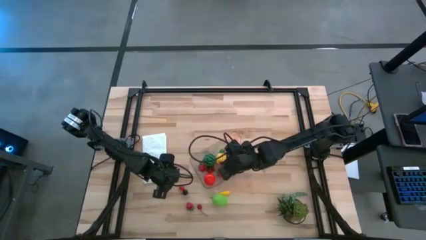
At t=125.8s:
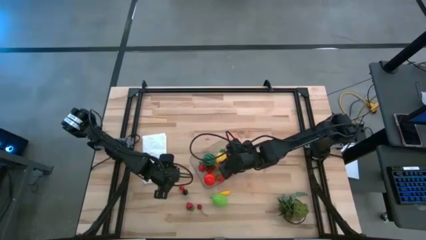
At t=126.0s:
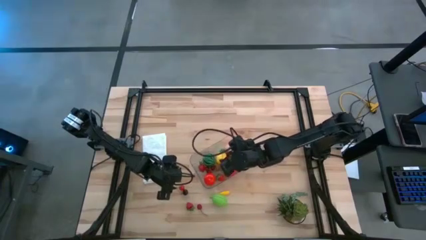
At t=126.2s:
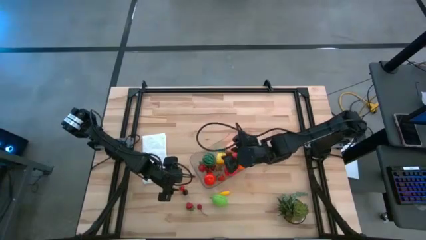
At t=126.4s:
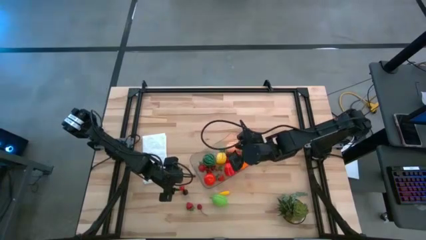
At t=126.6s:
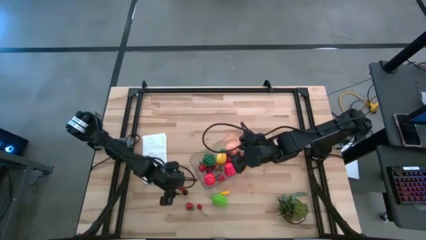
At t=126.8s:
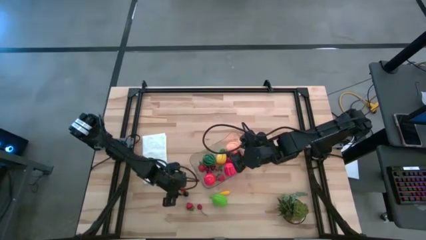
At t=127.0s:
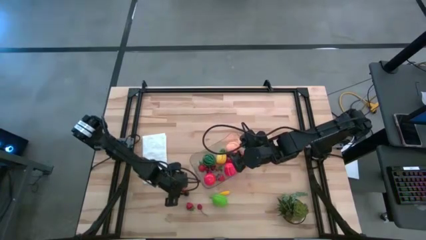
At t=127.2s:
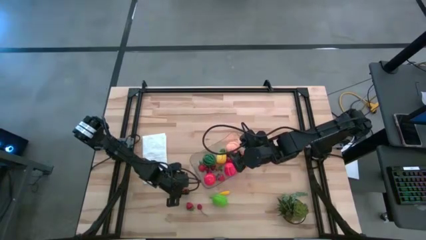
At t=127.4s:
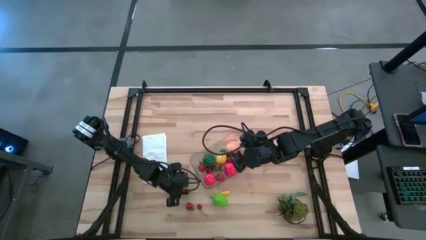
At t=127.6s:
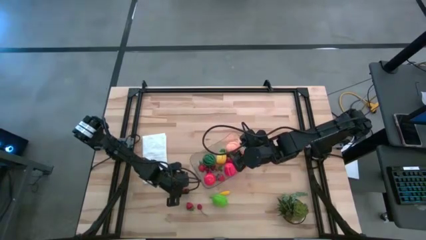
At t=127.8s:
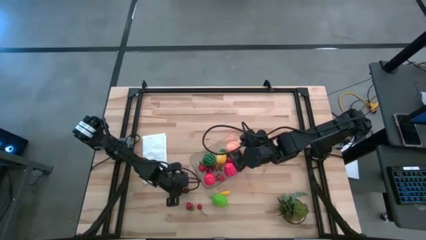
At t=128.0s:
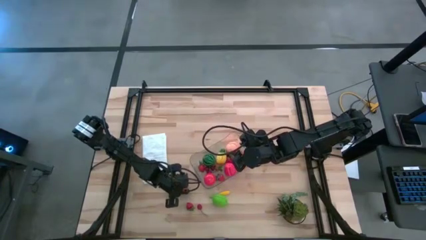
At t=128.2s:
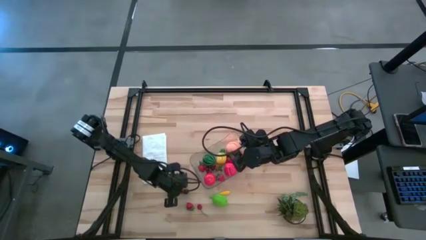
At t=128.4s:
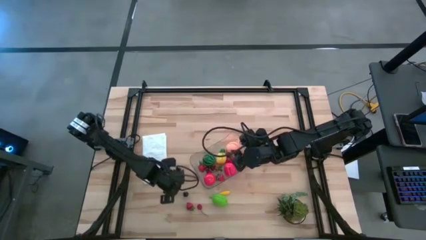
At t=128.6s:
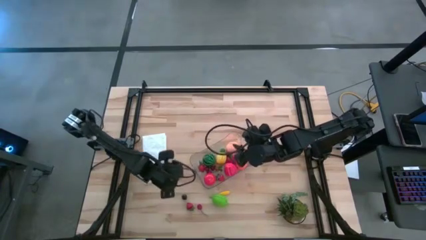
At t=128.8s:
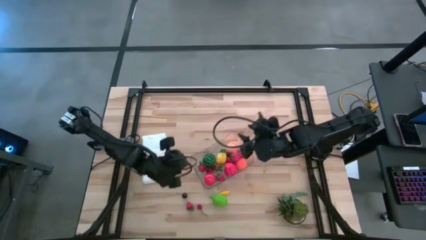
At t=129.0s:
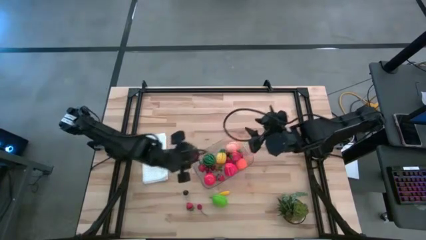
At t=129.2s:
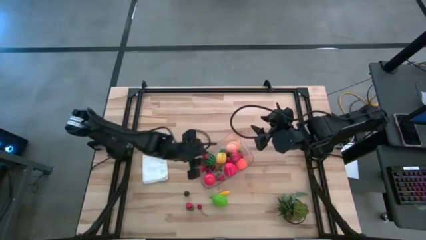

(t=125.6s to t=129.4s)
Task: Pick and placing Produce into tupperware
Put the red cherry into the transparent bin

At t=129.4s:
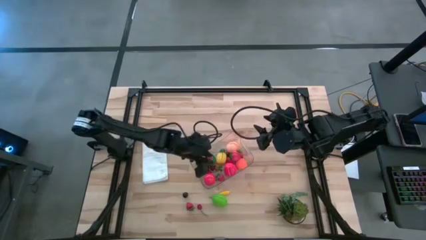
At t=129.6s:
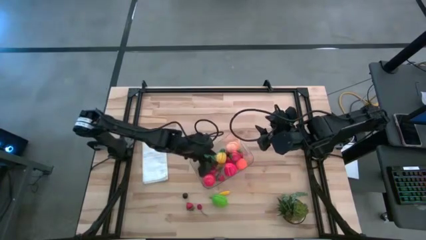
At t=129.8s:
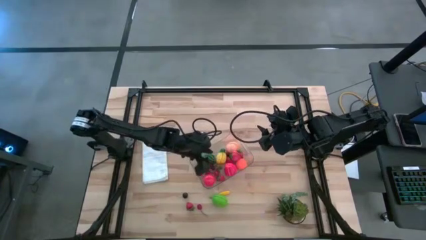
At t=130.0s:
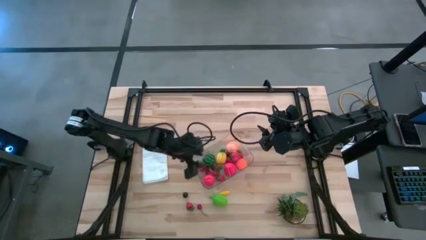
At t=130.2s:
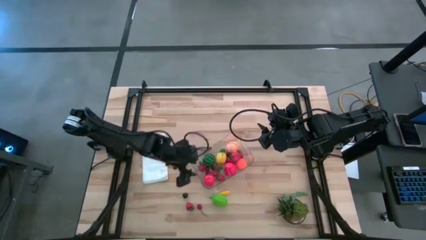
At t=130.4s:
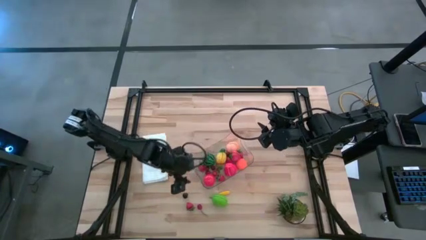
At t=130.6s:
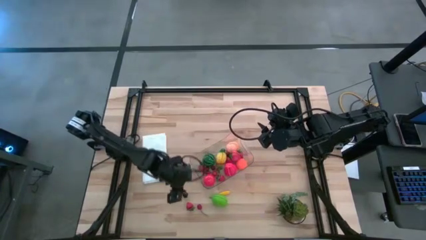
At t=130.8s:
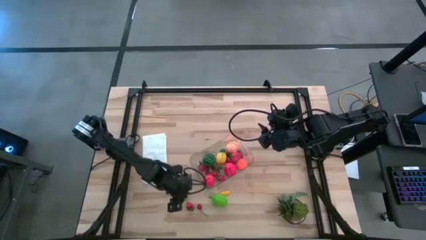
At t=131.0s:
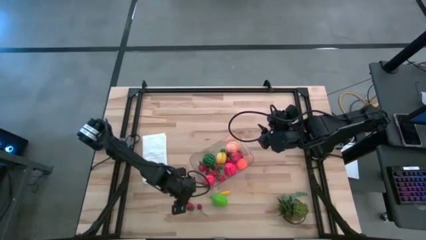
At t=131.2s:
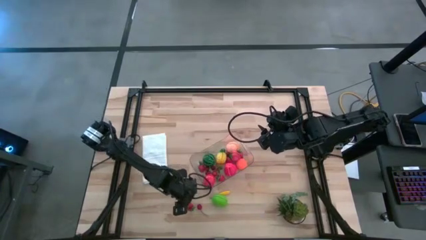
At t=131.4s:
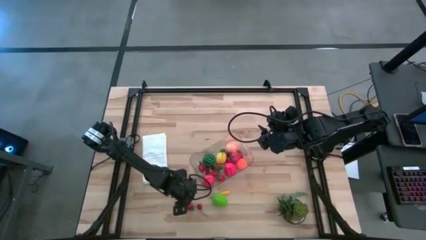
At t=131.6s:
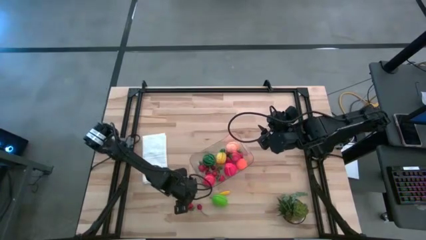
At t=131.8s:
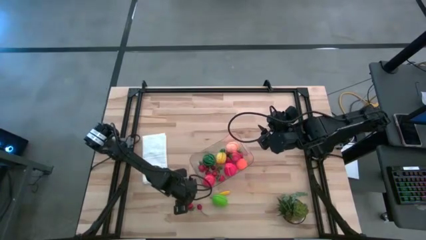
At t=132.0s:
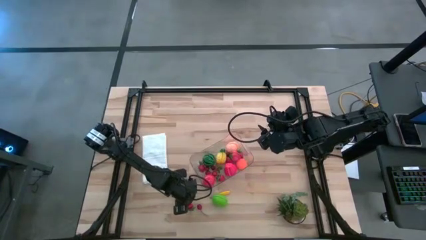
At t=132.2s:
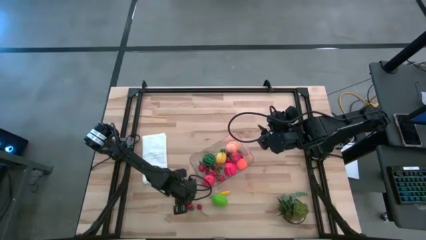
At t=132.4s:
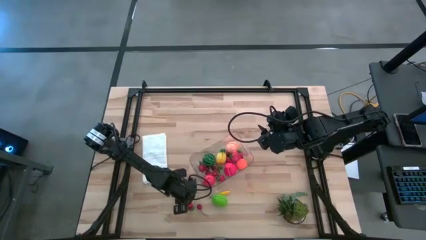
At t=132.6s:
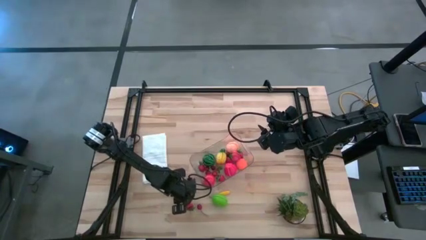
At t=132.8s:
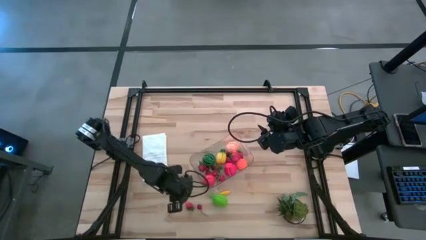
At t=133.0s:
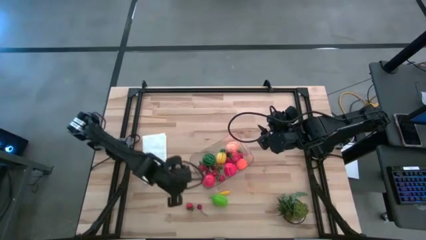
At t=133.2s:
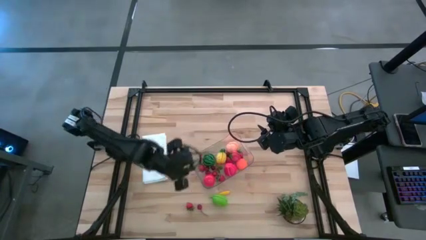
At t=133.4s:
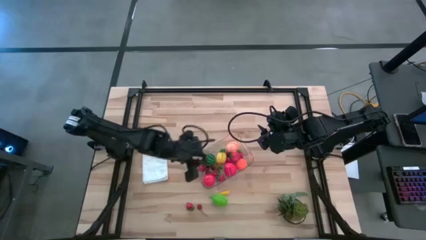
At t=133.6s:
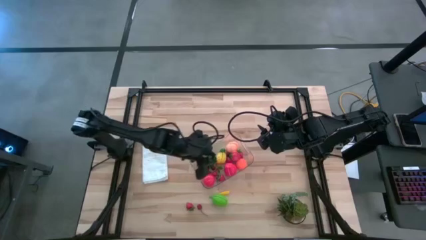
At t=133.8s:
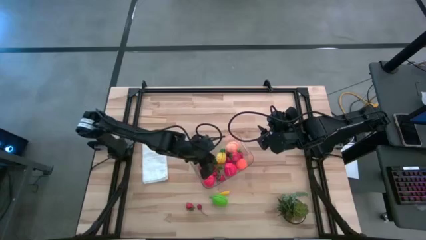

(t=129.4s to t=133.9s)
Put the black cherry into the transparent bin

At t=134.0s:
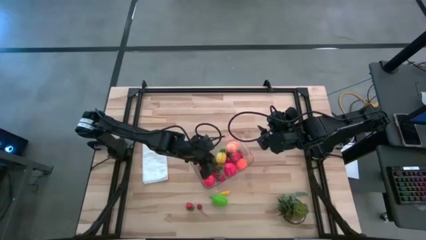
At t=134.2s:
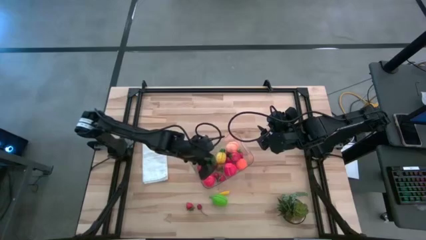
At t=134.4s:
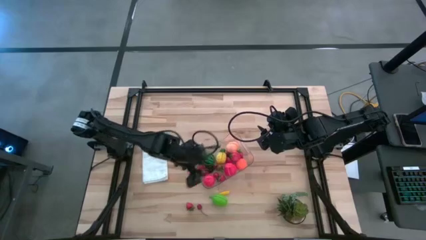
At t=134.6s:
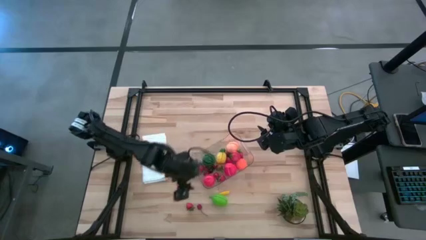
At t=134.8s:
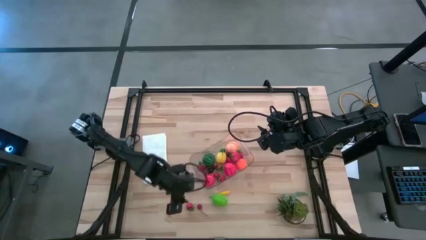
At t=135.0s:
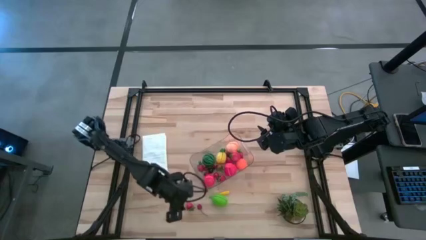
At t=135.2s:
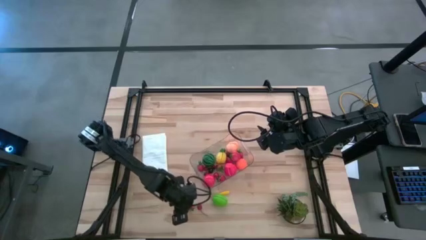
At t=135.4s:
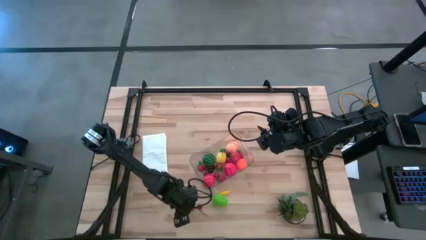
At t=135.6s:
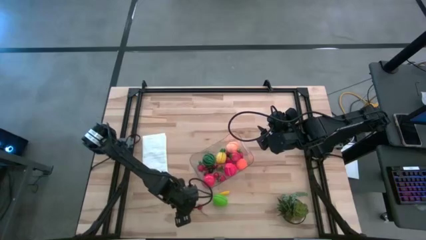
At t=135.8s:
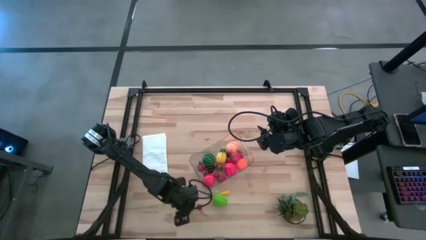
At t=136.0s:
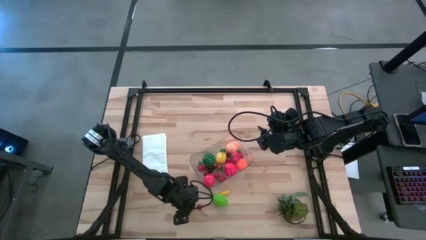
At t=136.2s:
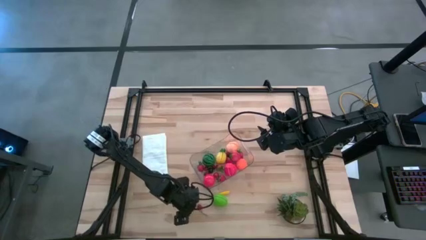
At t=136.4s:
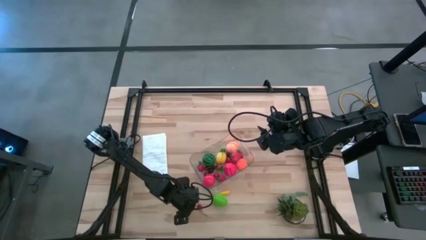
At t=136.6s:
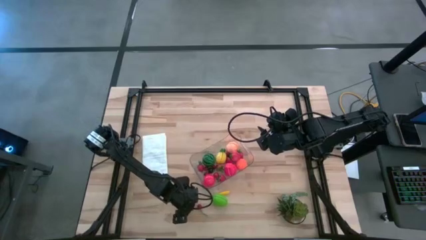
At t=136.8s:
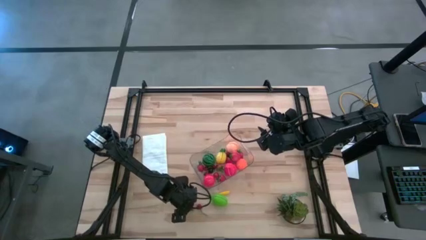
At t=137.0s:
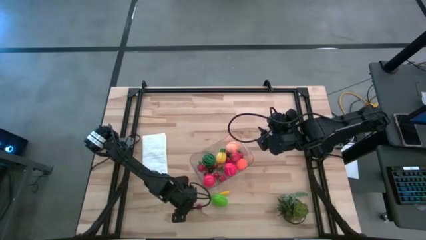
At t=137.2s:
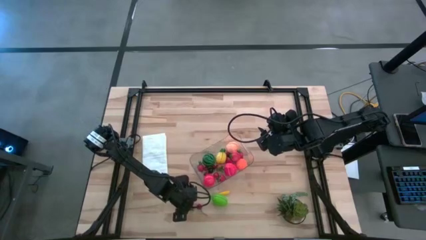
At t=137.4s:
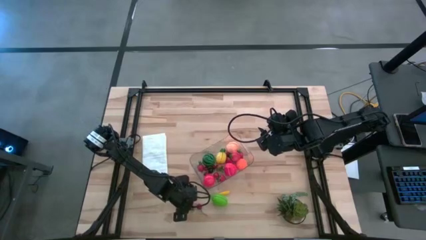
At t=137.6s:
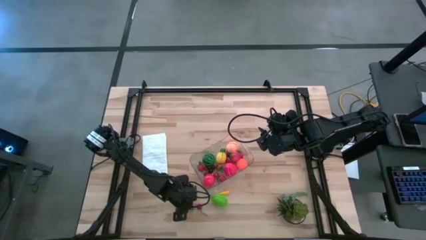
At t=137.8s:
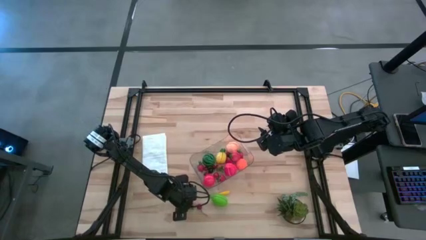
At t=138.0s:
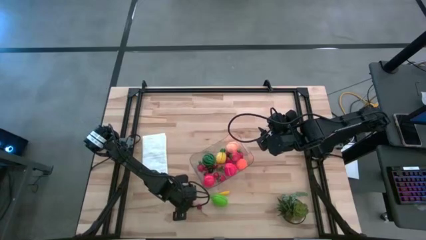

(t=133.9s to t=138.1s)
Put the strawberry into the transparent bin

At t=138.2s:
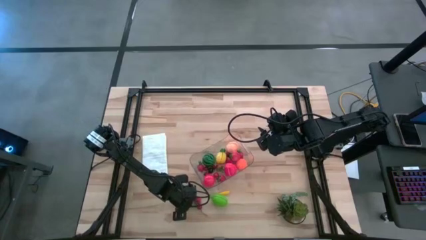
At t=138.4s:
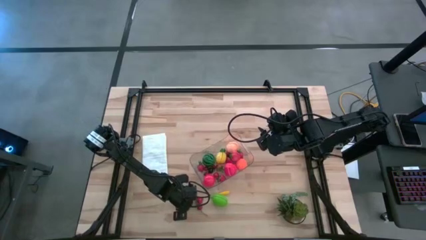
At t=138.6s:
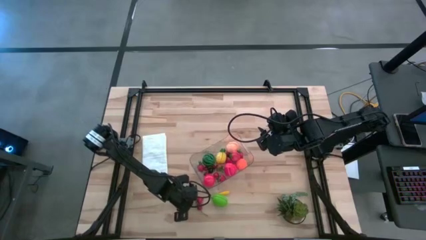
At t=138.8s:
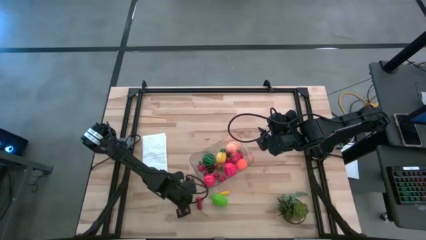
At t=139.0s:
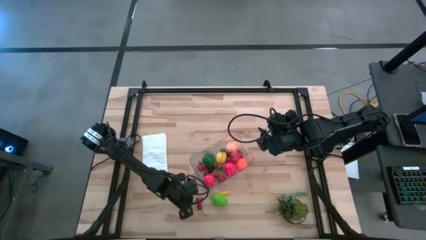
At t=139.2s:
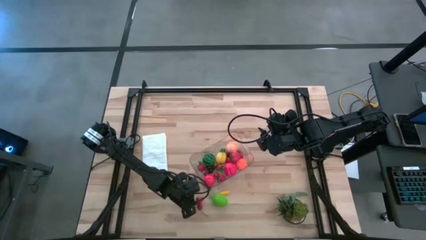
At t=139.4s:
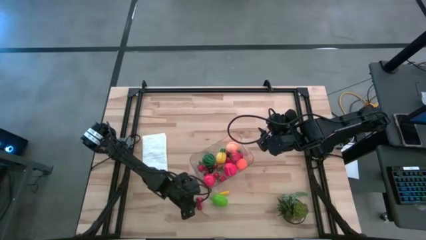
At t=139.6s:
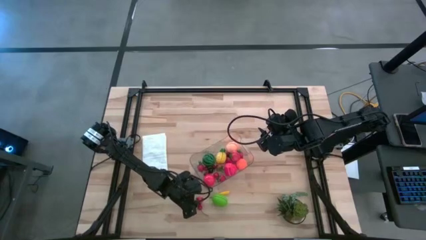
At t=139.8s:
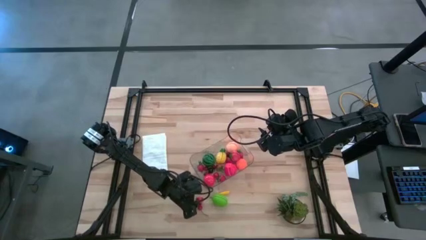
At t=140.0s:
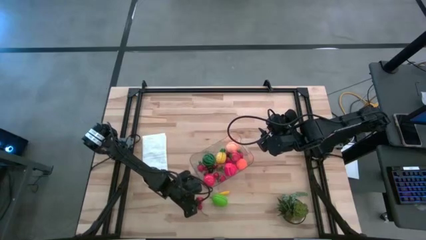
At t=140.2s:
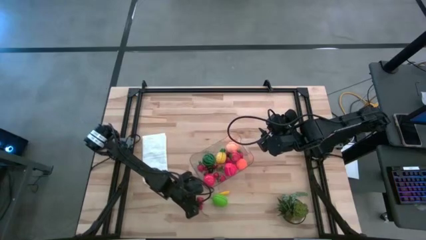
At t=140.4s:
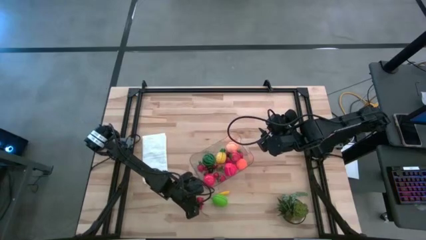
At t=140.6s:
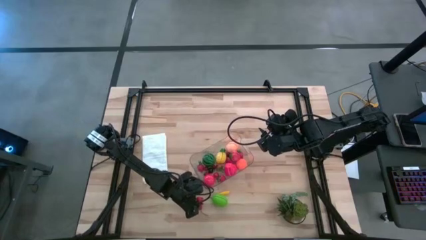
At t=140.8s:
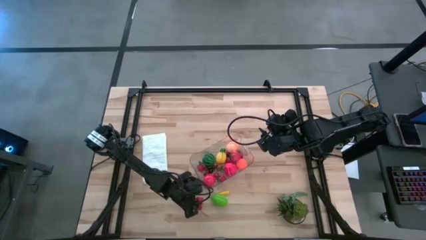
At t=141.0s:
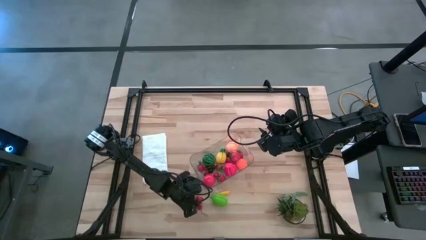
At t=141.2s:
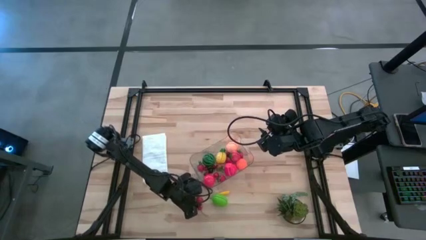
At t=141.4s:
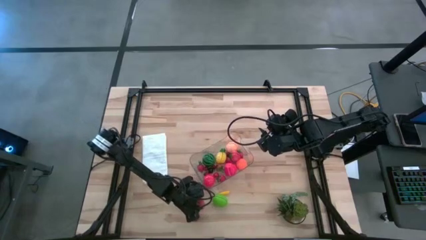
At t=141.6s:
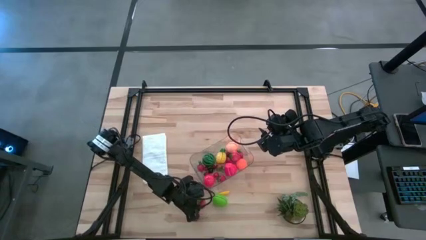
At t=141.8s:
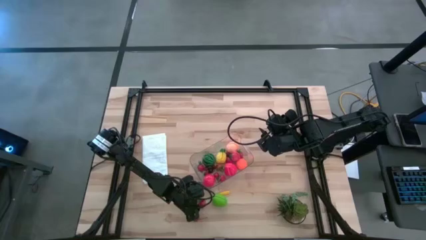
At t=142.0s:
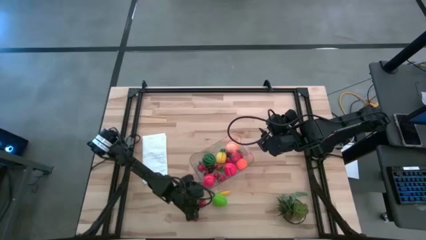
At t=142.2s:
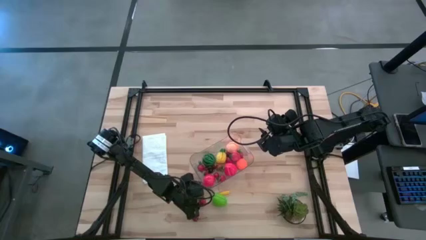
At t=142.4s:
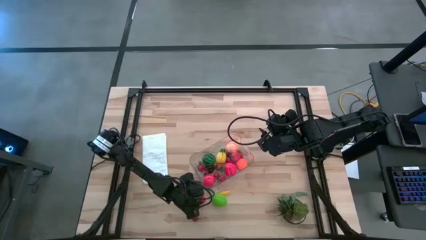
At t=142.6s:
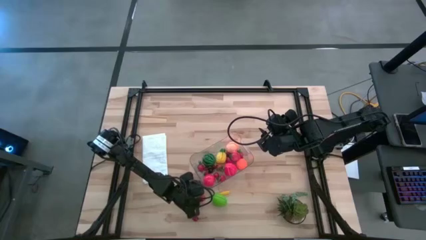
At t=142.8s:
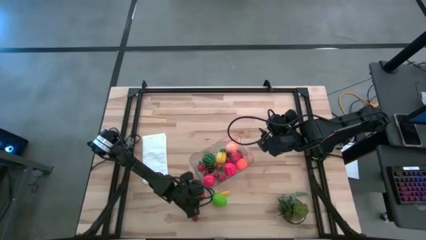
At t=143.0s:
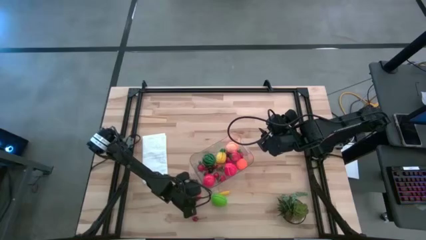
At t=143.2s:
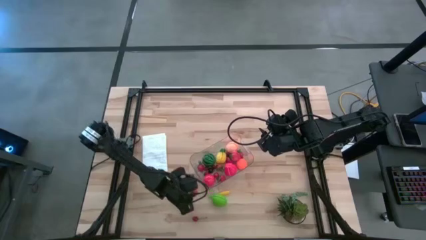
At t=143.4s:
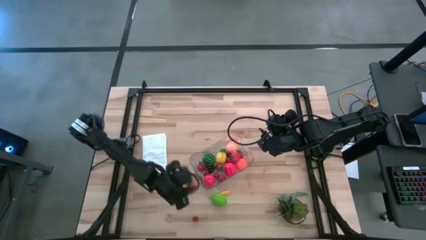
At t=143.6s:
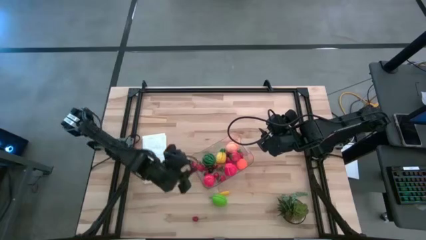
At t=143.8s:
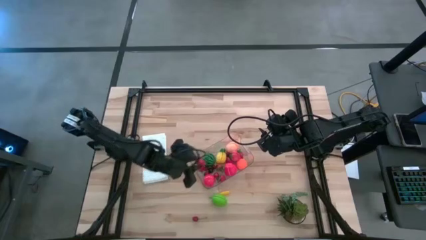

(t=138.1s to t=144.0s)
Put the strawberry into the transparent bin
